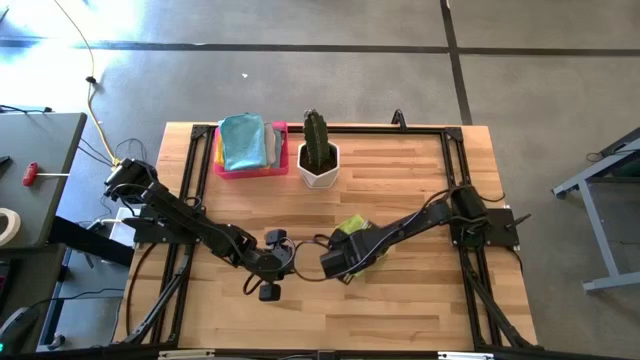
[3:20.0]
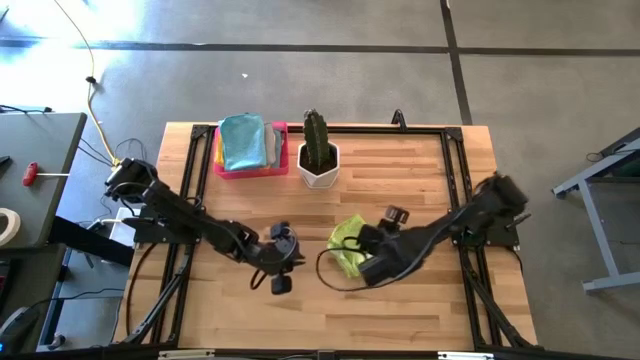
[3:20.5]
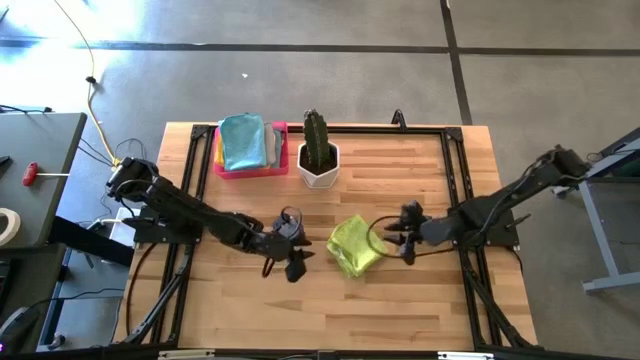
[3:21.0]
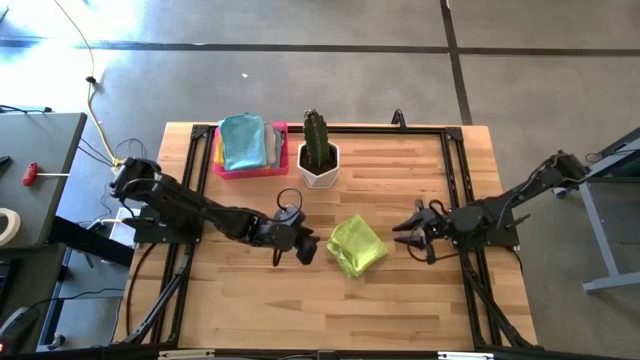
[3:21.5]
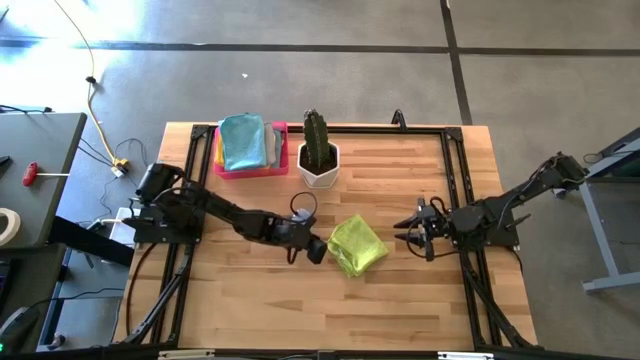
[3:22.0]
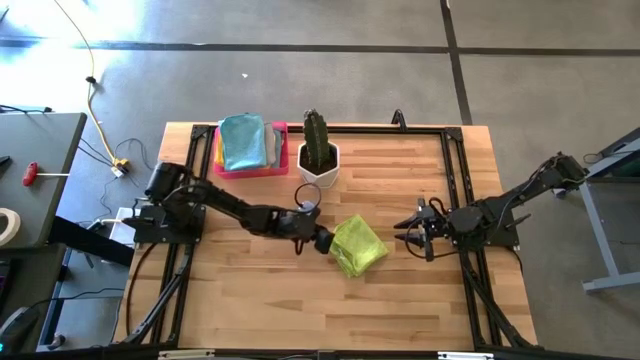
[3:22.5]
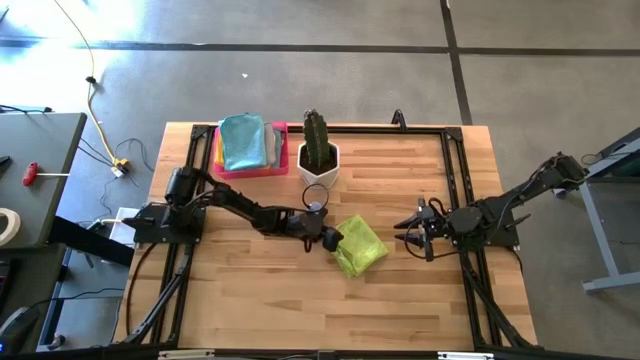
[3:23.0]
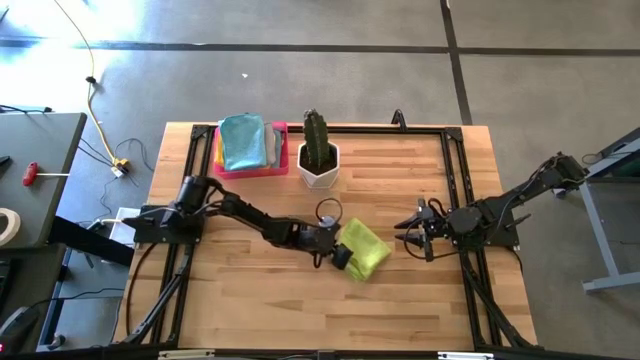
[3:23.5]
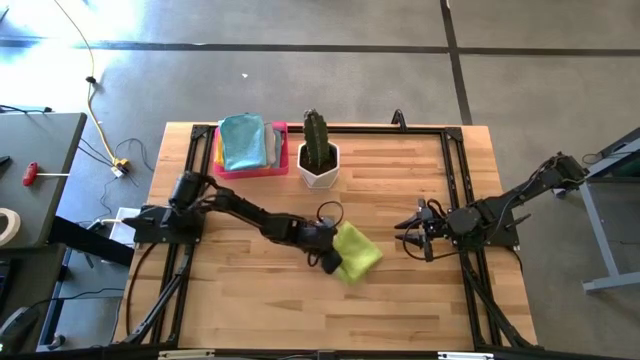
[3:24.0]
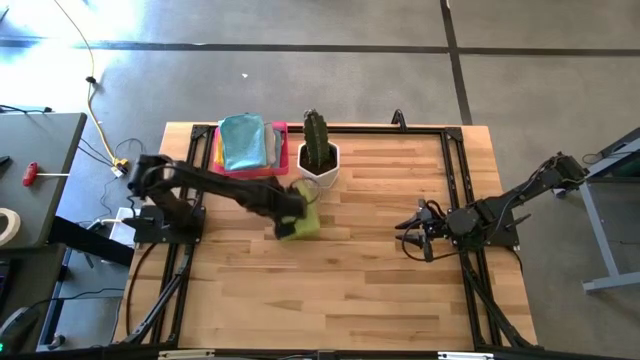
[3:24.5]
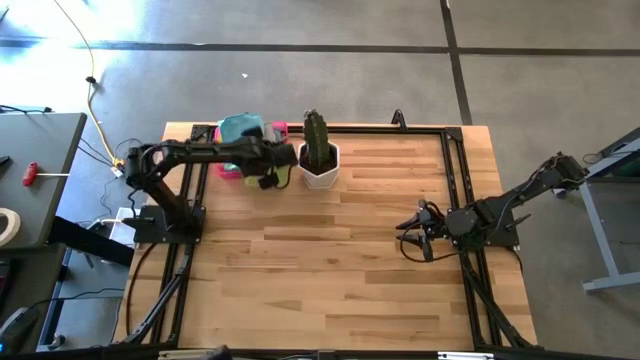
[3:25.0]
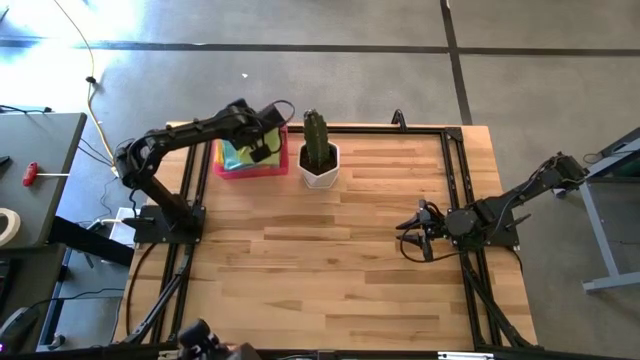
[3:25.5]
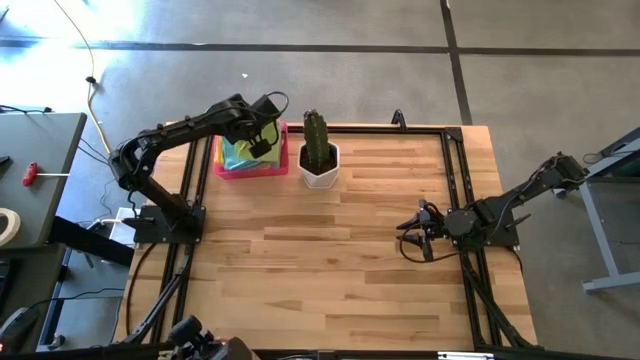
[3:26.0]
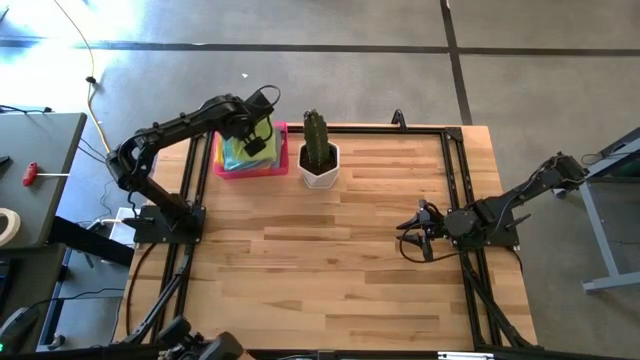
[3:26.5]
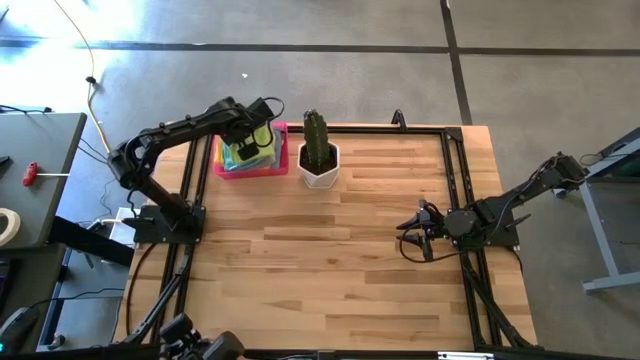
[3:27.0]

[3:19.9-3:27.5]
Task: Fold microfiber towels
Put the folded green microfiber towel on the pink bin

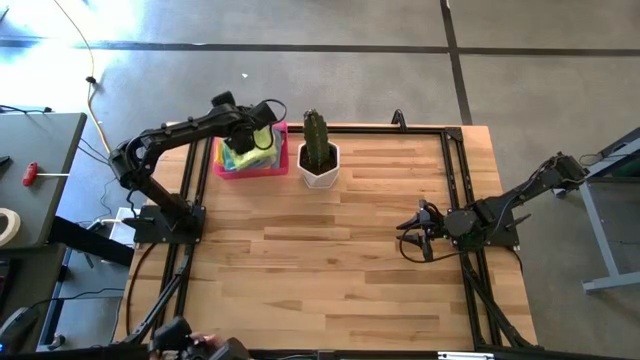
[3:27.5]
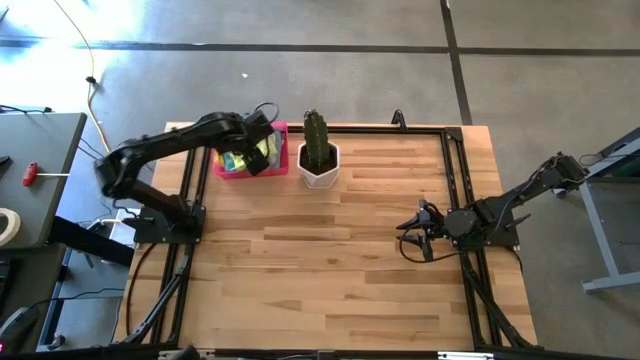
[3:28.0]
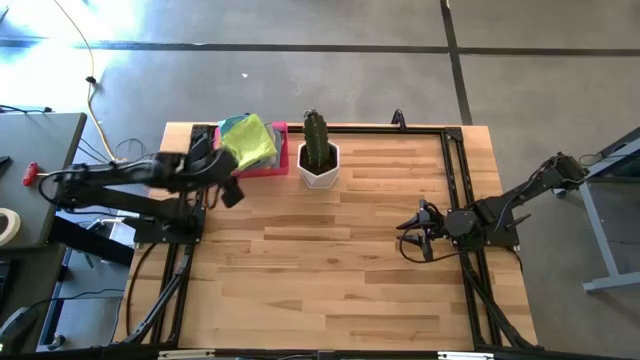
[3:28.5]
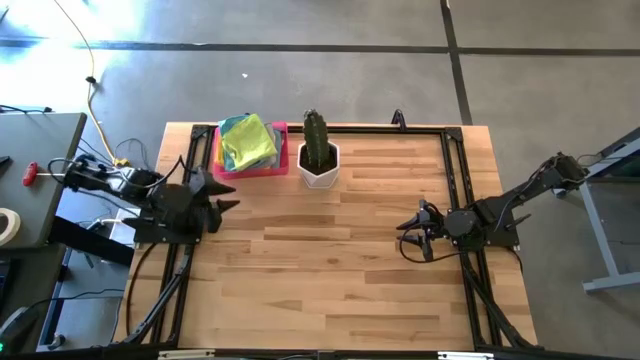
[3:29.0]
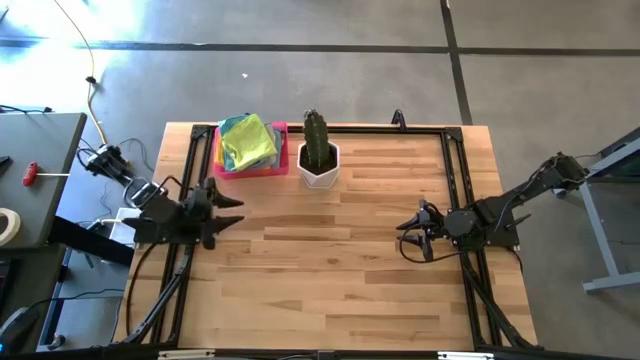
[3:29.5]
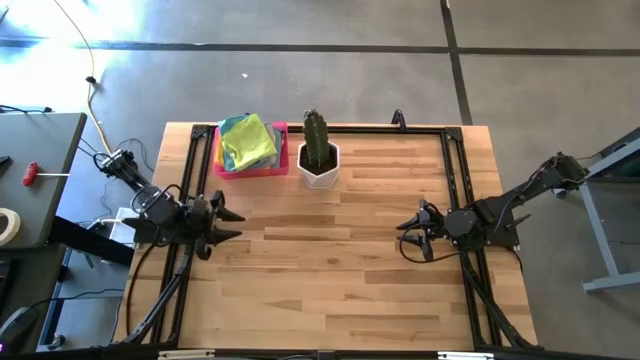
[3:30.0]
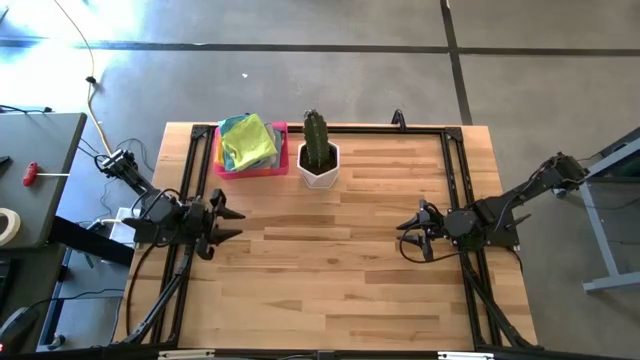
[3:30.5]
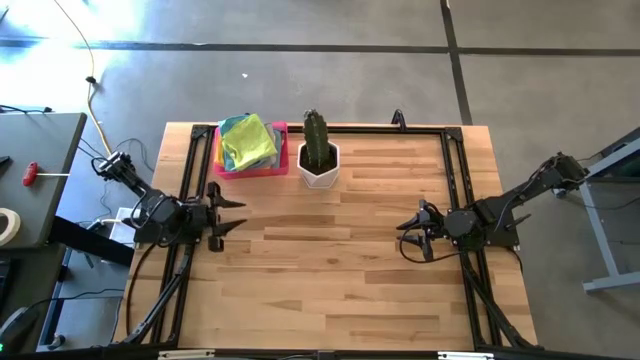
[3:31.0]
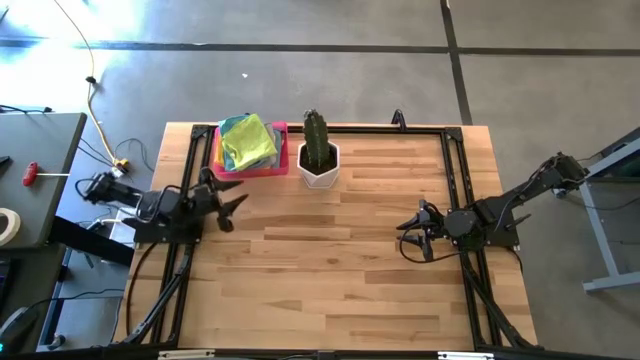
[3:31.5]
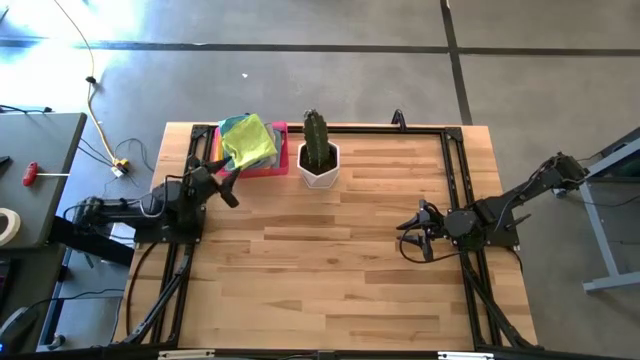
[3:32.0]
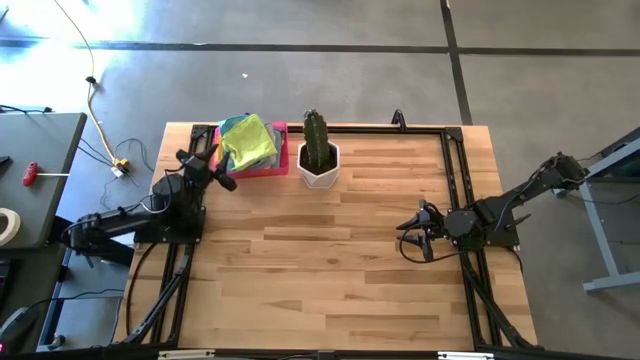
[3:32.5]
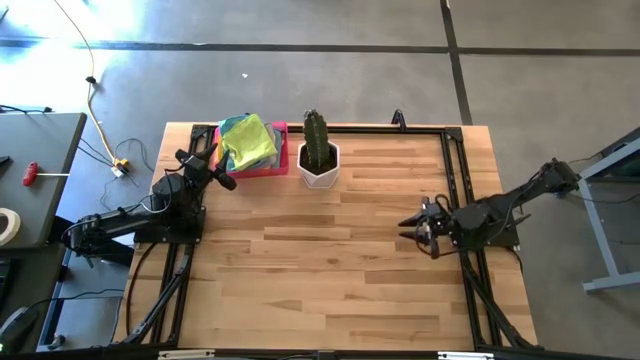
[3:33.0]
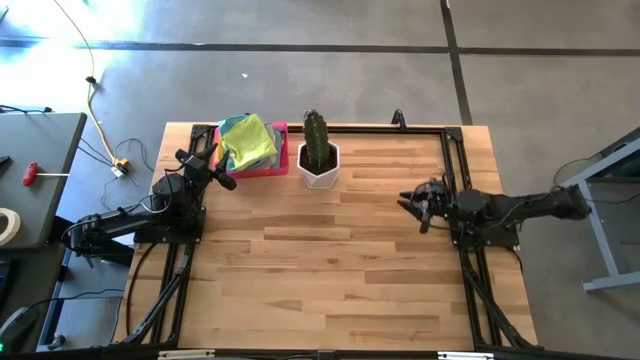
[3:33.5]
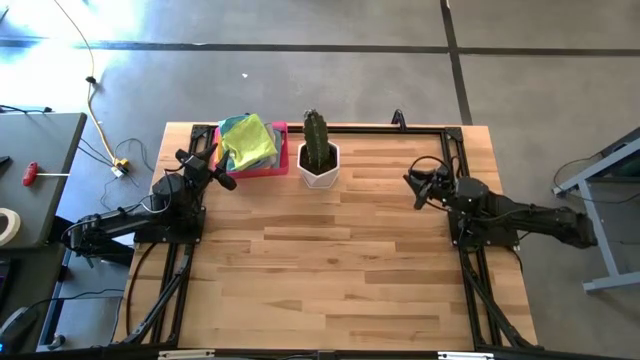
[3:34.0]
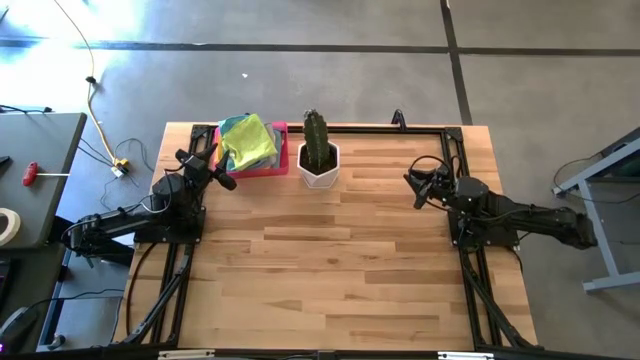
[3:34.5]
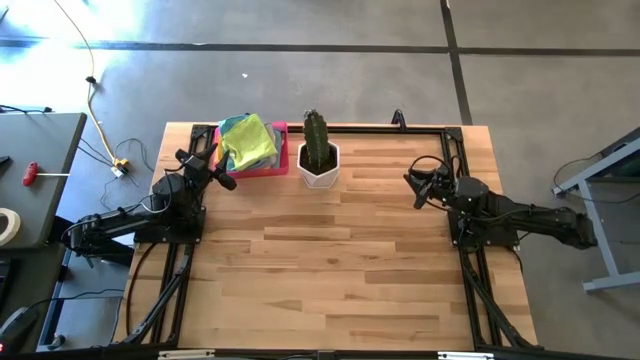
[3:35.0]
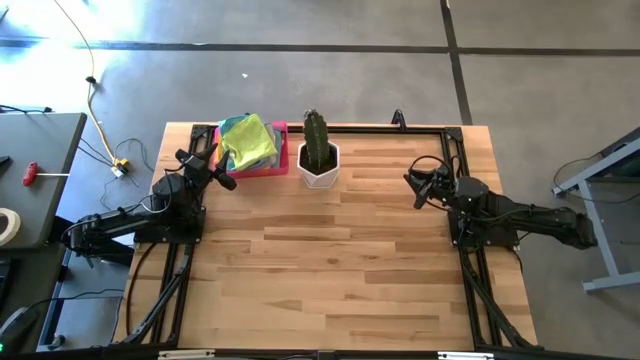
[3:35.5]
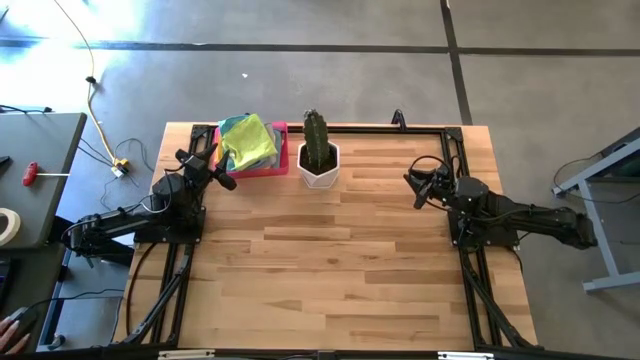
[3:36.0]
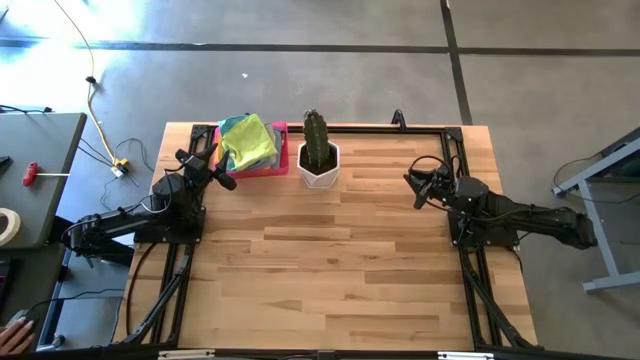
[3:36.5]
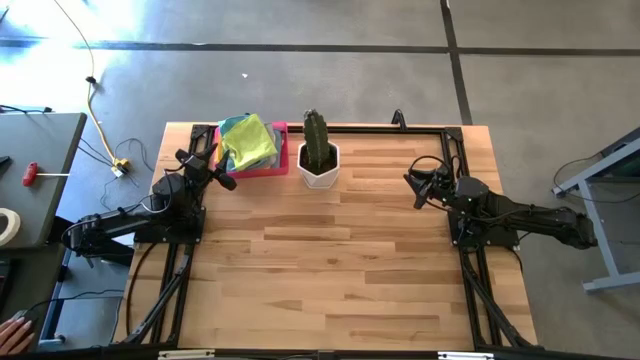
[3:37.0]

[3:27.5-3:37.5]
Return to Home Position

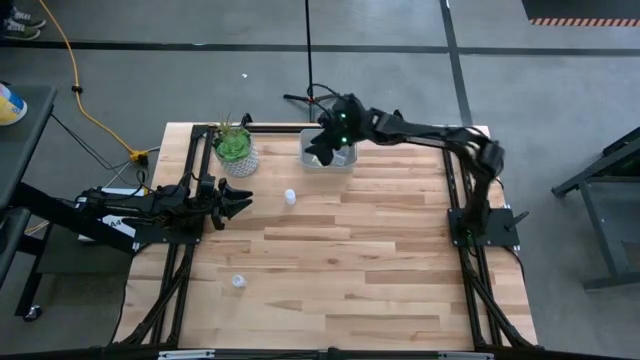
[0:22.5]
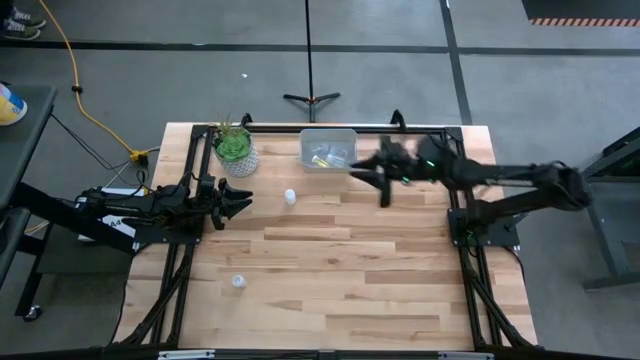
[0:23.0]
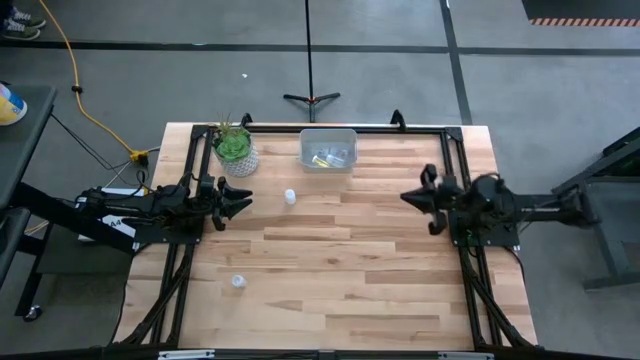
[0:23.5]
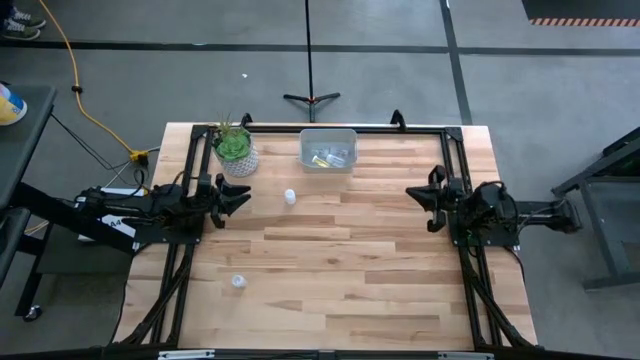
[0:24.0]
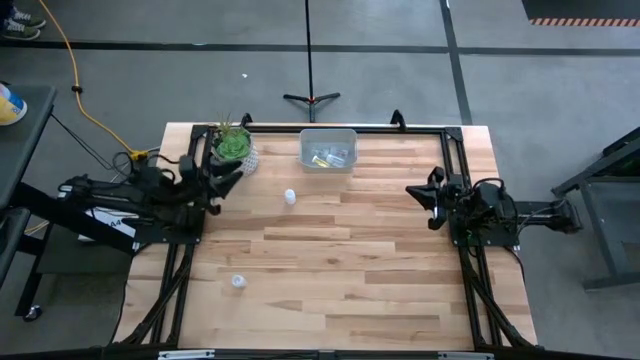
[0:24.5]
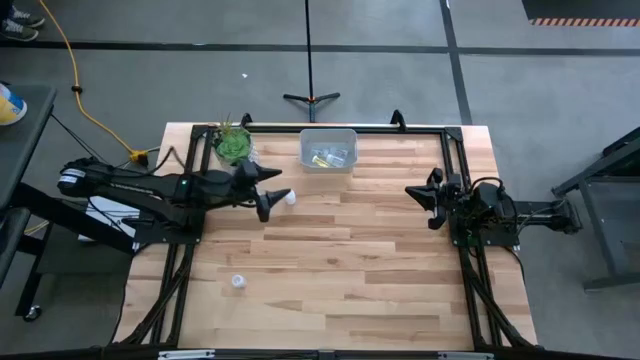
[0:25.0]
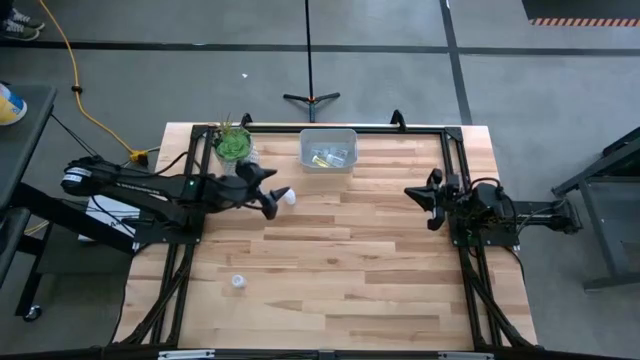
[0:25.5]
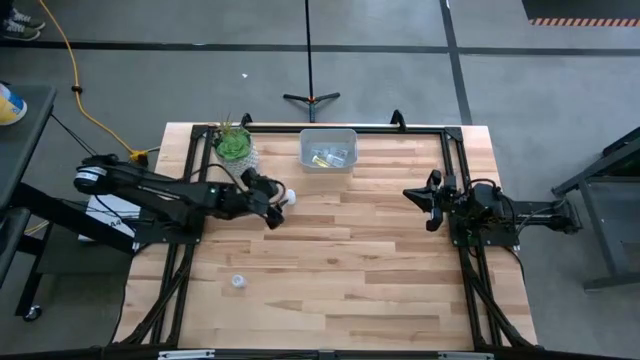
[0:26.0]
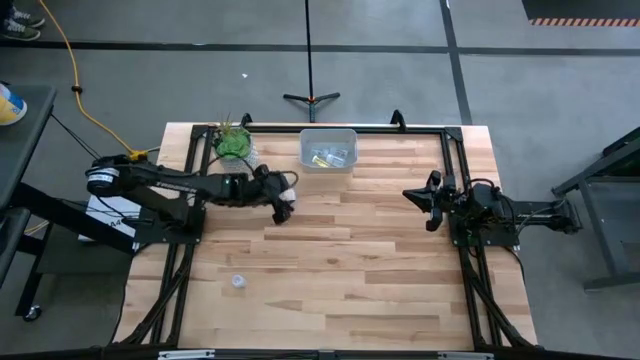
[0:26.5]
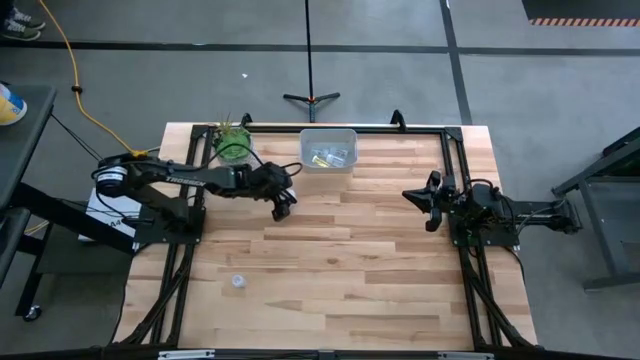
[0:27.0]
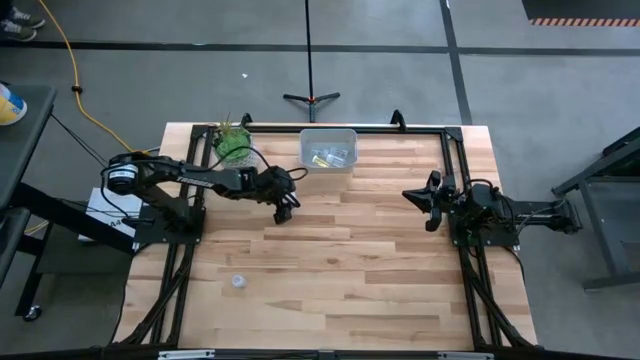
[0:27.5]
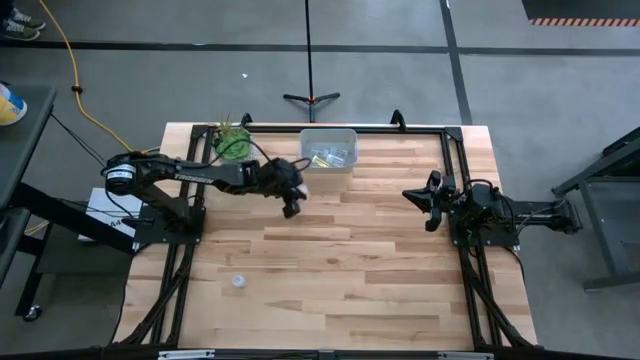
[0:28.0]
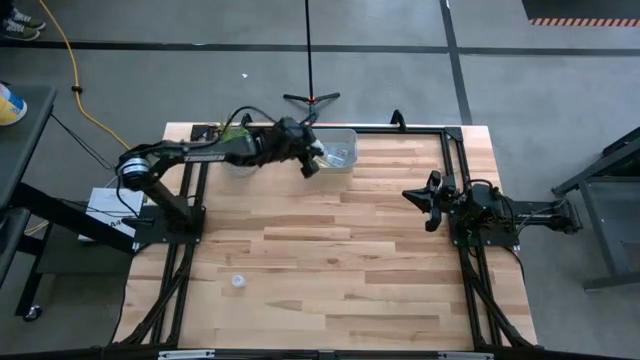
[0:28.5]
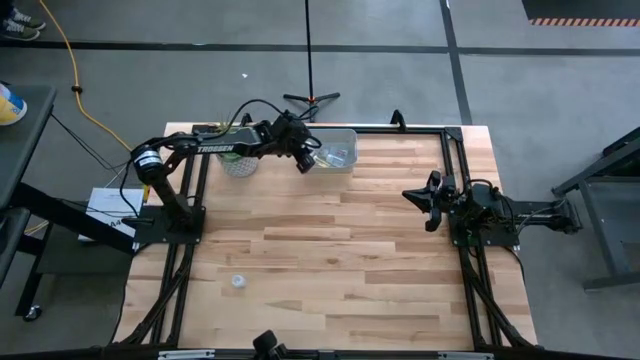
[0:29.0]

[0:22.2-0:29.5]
Task: Pick and place pill bottles into a basket
Put the transparent pill bottle into the gray bin
